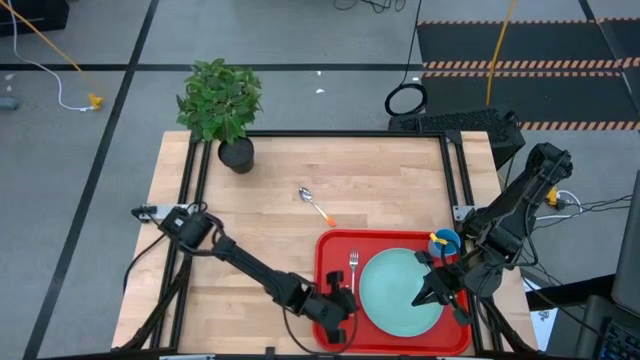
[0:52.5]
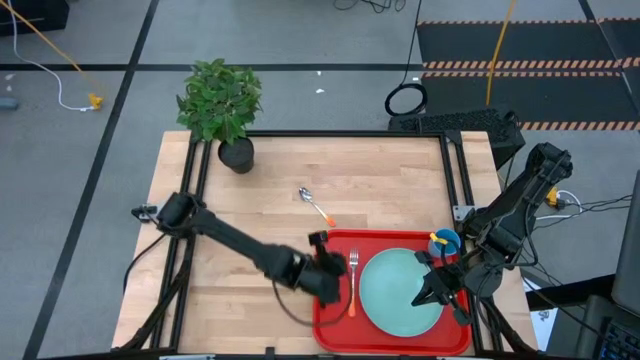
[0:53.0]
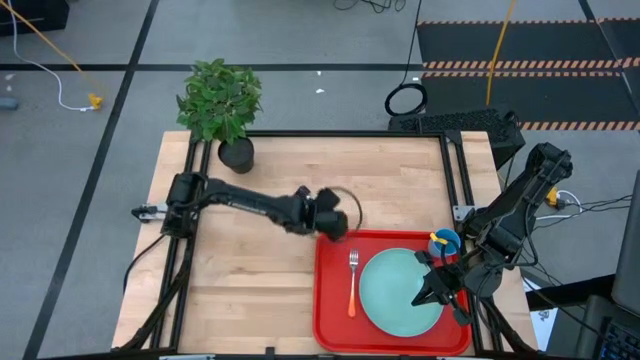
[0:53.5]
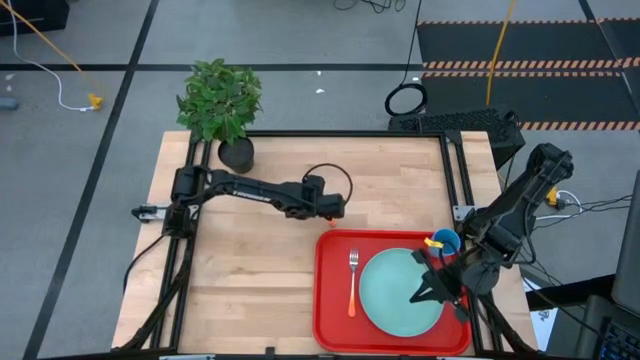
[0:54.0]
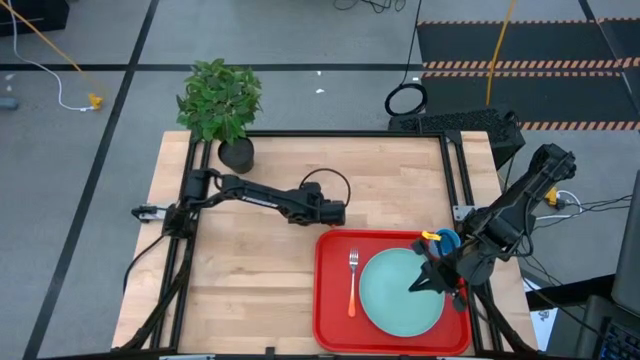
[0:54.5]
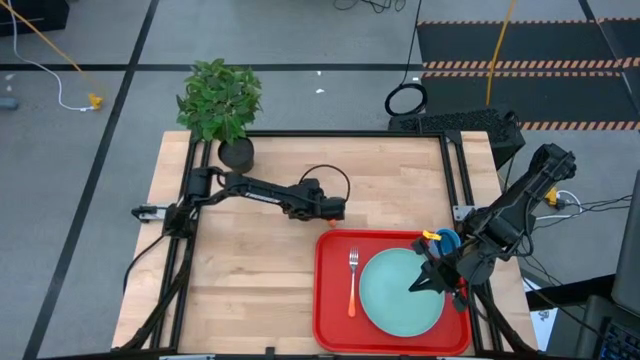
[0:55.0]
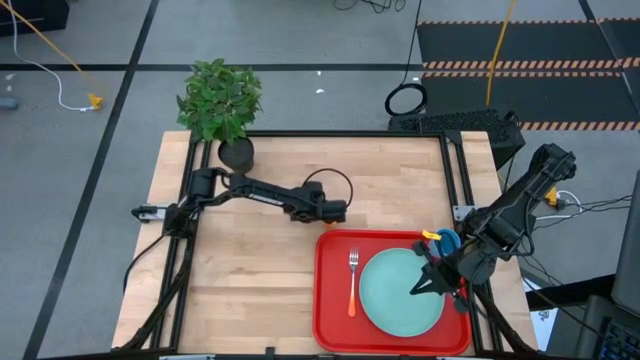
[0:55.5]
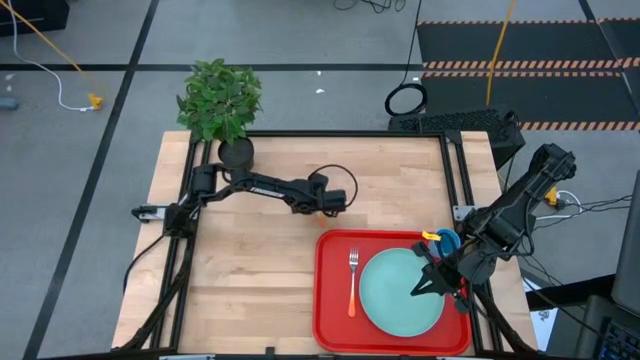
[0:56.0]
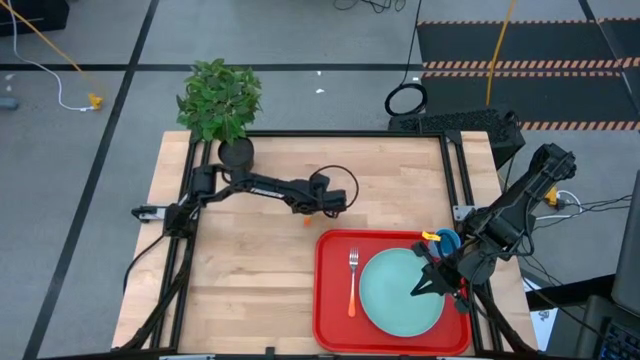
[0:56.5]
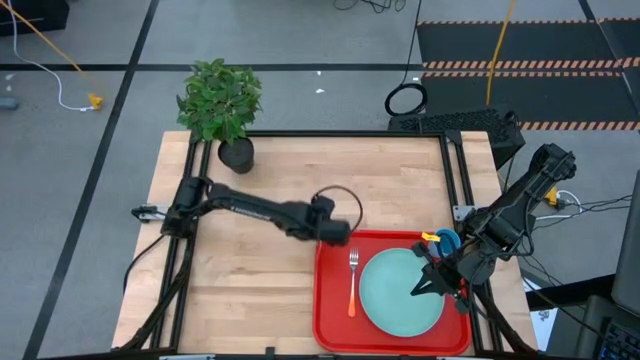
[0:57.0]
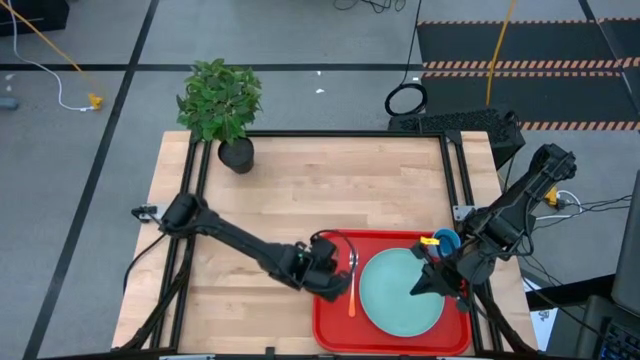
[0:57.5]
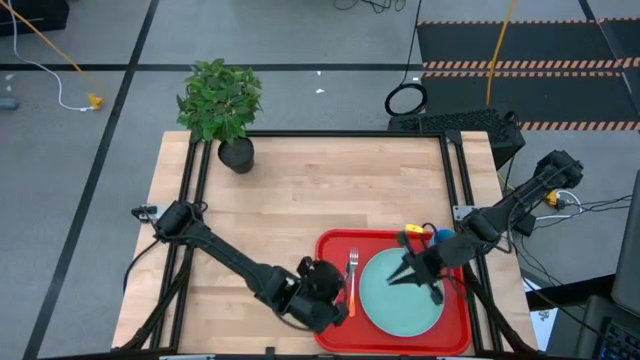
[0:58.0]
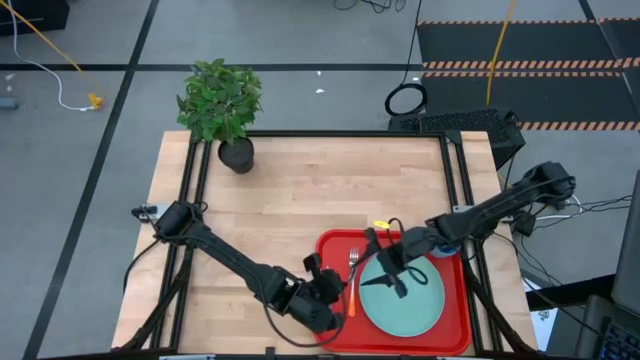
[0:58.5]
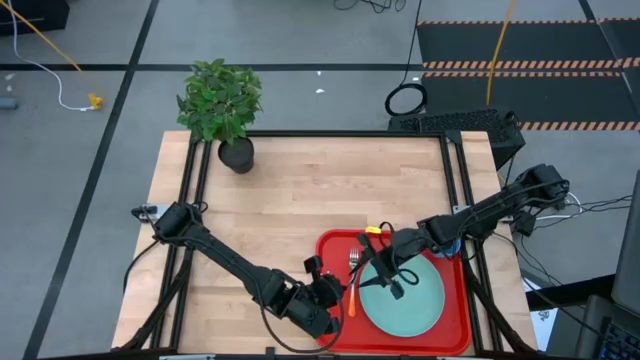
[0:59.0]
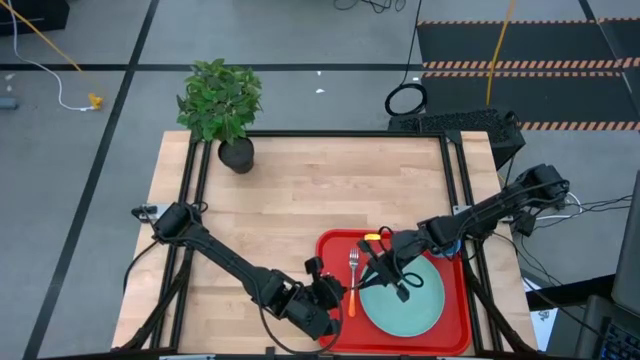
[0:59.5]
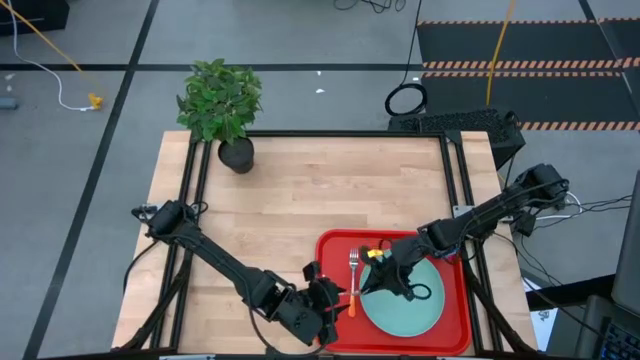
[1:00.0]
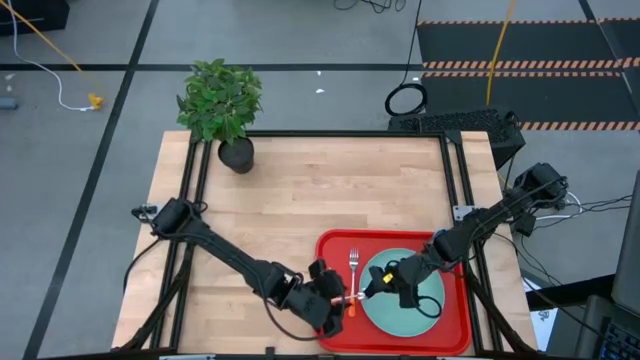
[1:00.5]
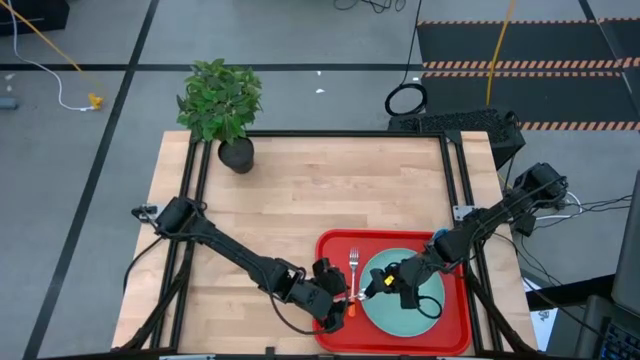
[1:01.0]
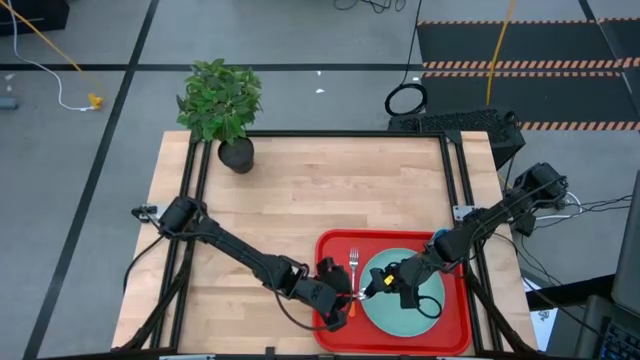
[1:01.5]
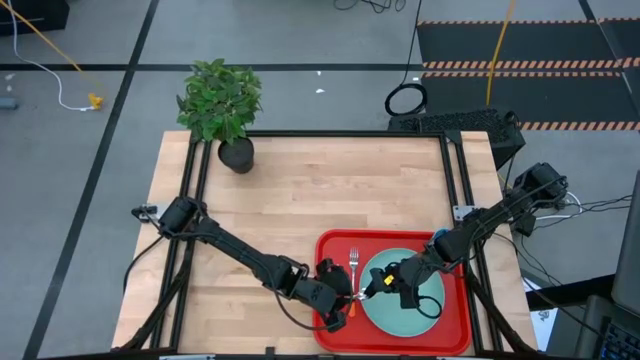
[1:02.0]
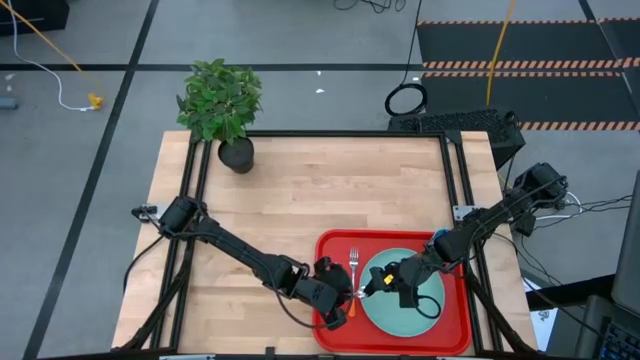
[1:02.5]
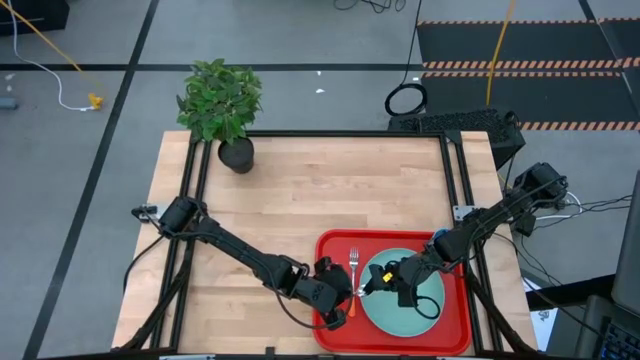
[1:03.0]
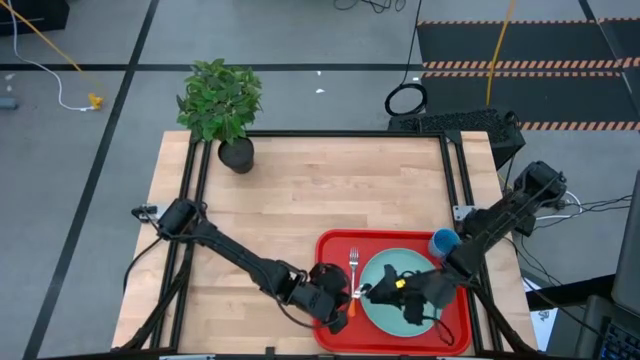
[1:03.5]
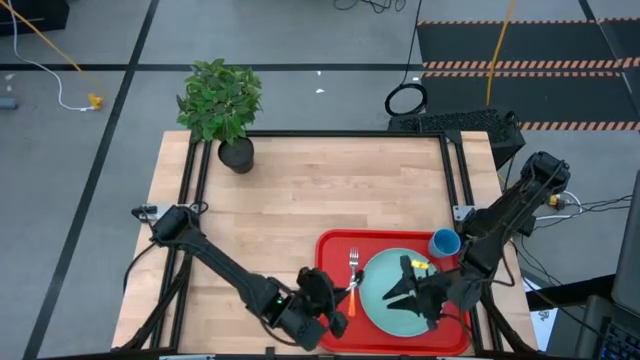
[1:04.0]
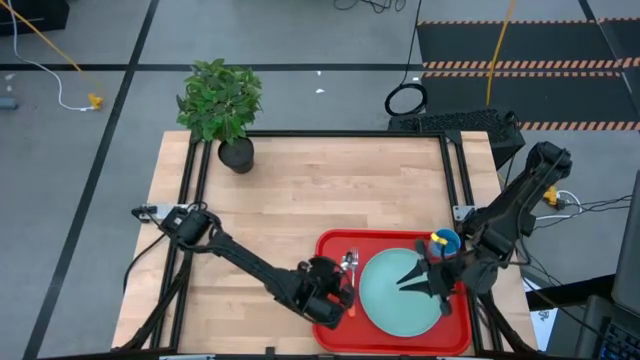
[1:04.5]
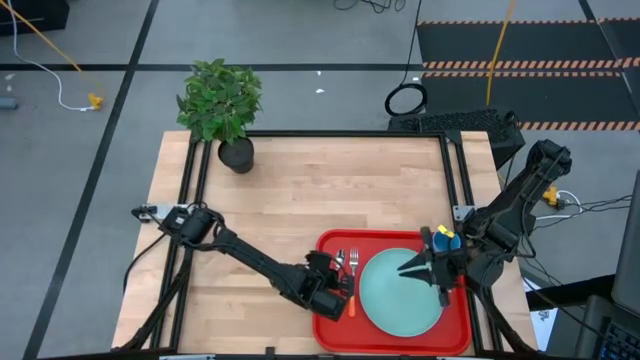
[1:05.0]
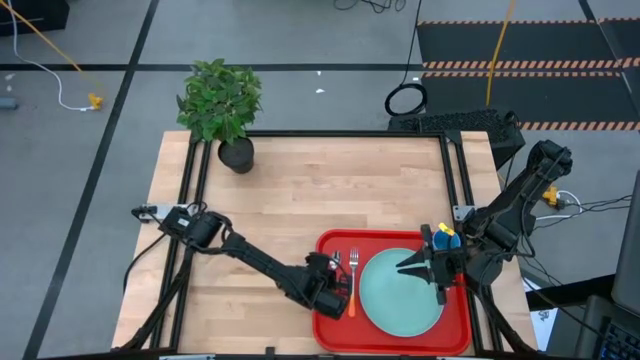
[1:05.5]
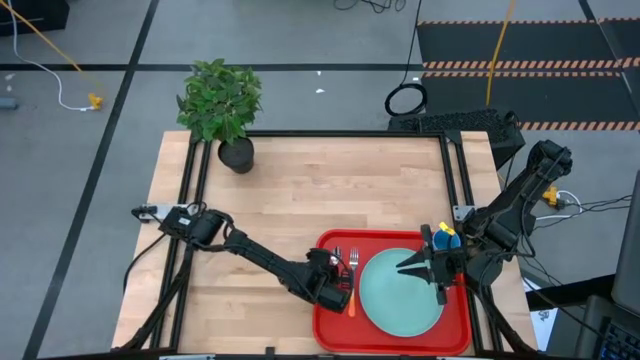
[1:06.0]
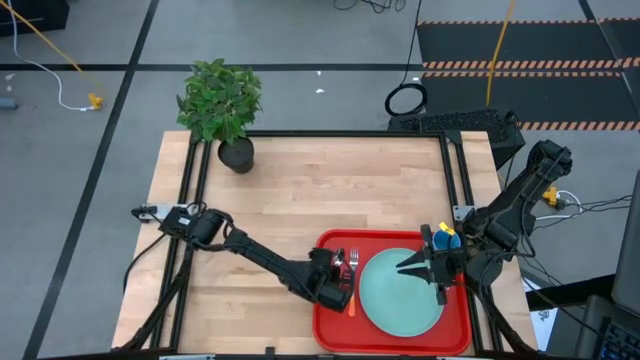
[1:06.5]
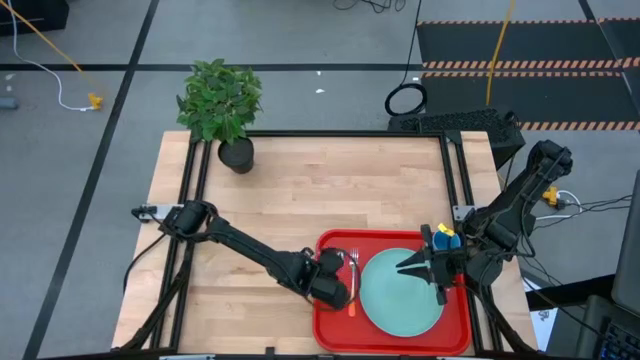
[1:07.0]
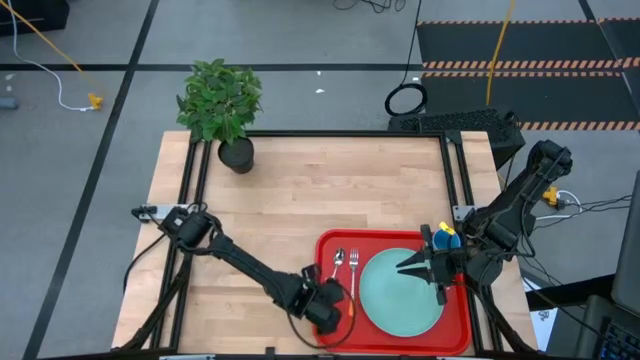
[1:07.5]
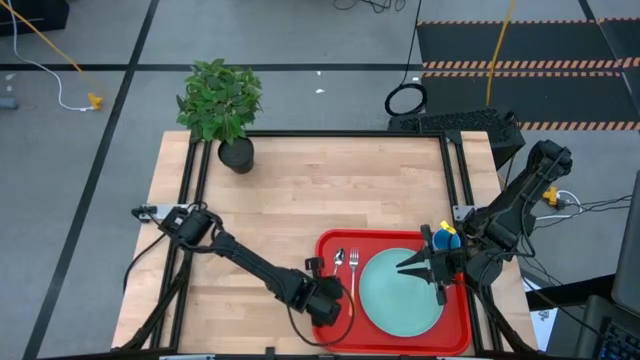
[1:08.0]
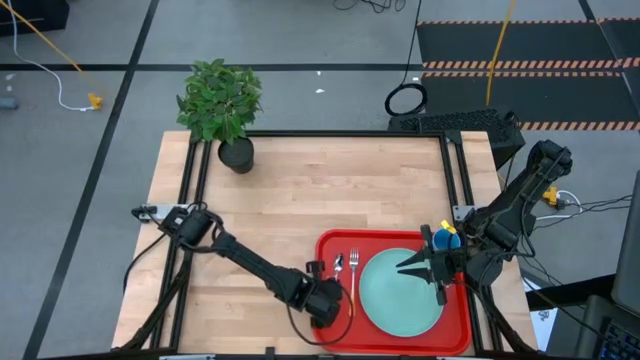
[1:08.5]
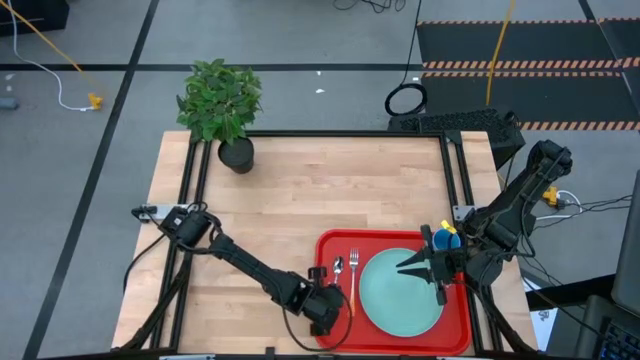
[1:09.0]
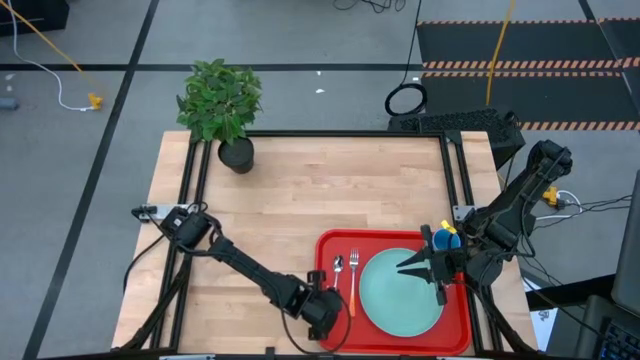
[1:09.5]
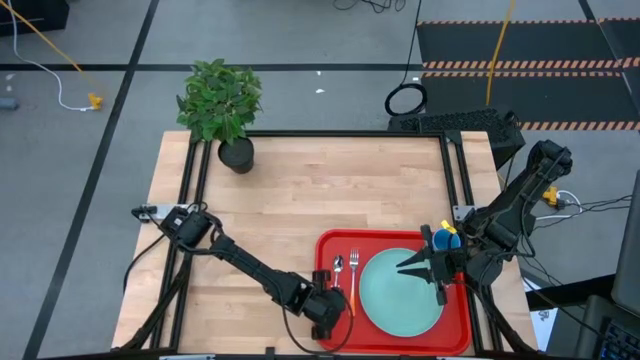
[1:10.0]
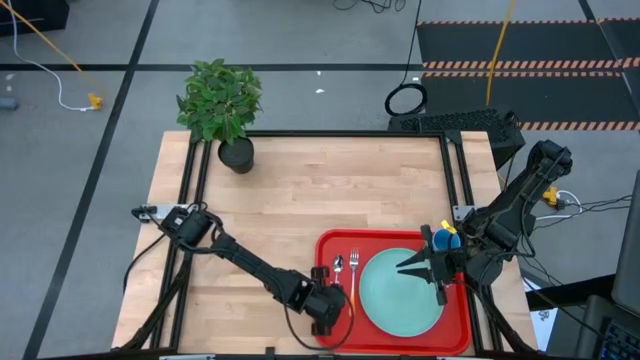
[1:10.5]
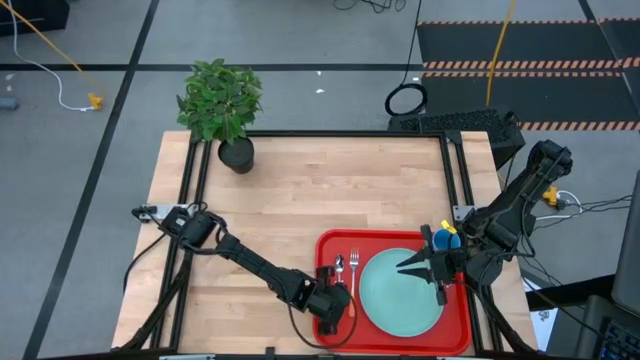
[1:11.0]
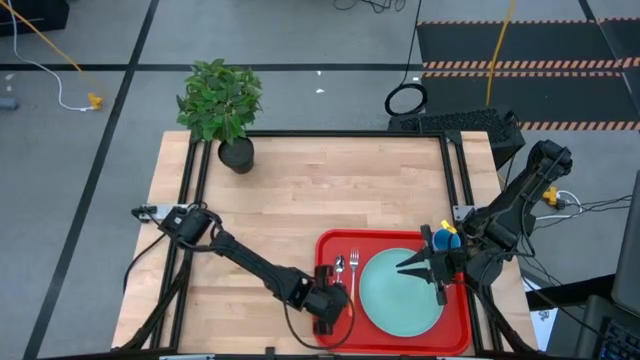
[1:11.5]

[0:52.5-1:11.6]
Task: Pick and place plate/cup/fork/spoon on tray
Put the orange spoon on the left side of the orange fork on the red serving tray
